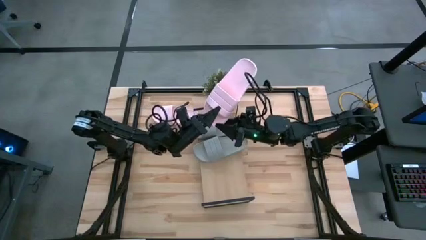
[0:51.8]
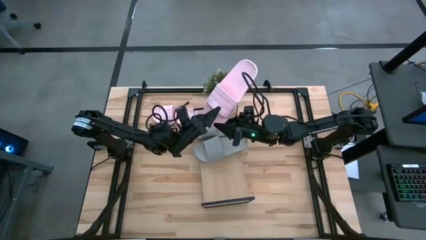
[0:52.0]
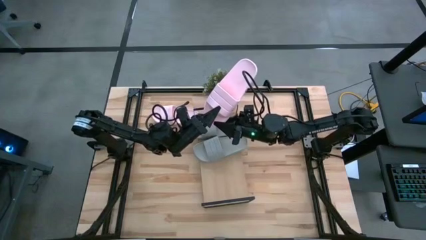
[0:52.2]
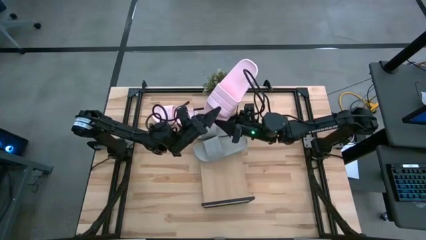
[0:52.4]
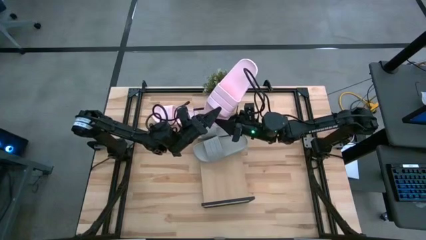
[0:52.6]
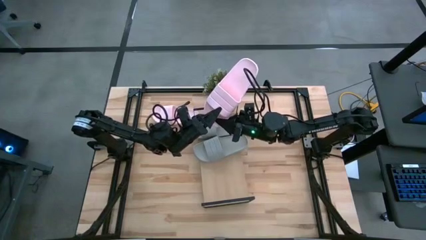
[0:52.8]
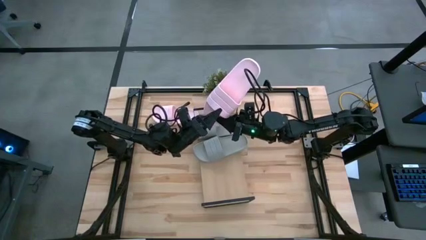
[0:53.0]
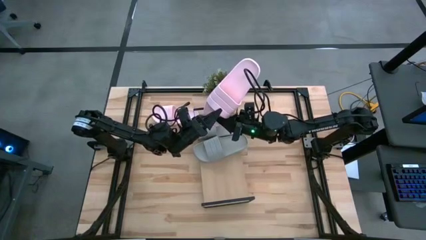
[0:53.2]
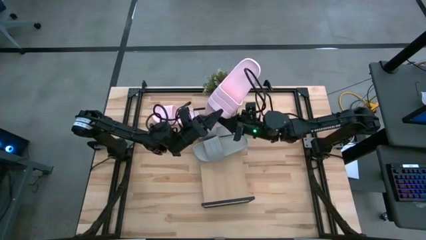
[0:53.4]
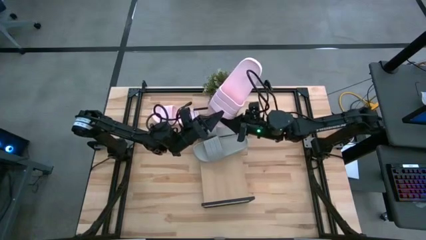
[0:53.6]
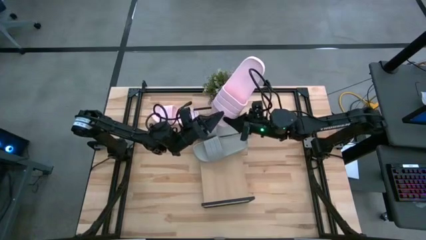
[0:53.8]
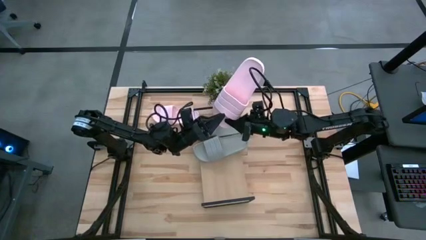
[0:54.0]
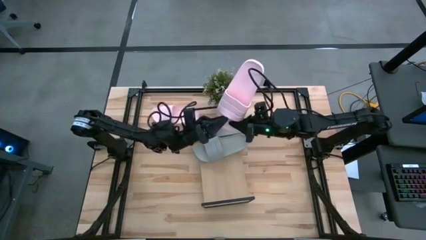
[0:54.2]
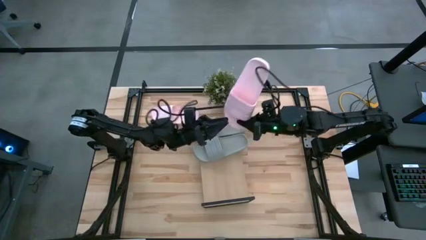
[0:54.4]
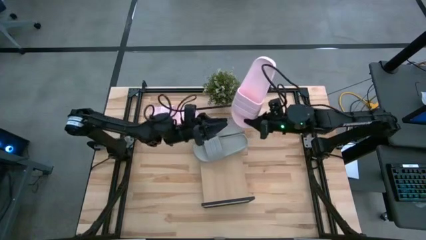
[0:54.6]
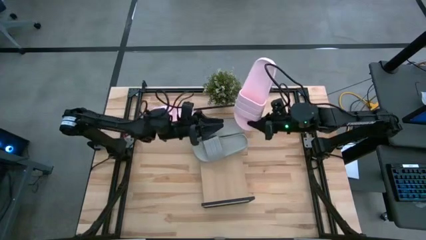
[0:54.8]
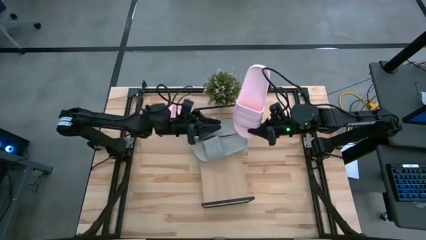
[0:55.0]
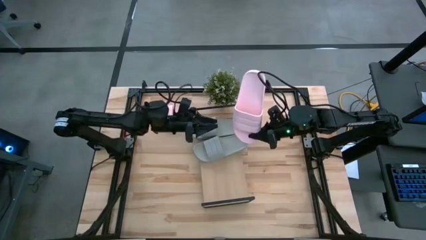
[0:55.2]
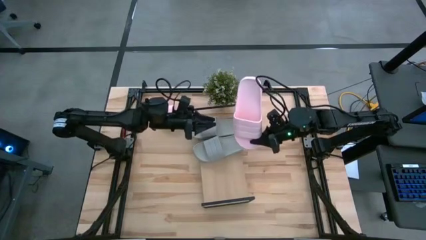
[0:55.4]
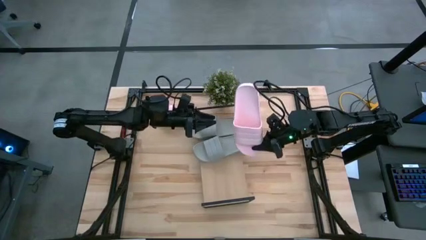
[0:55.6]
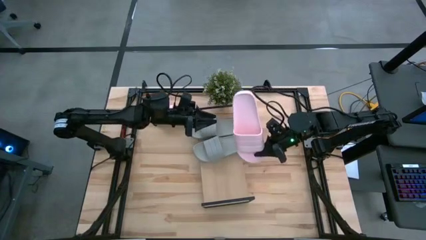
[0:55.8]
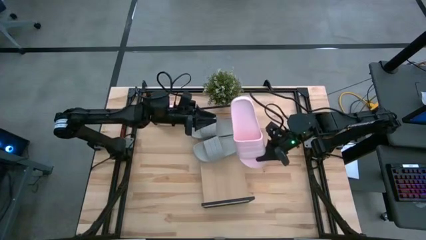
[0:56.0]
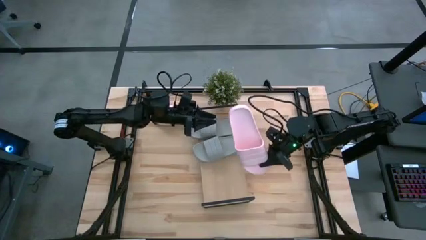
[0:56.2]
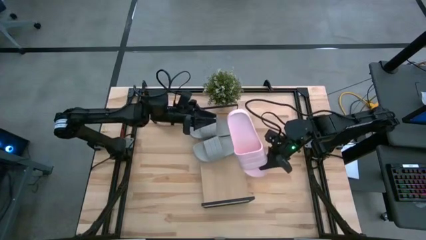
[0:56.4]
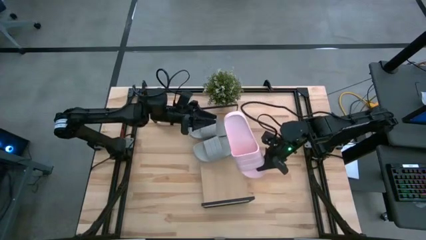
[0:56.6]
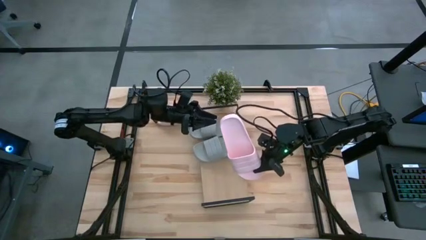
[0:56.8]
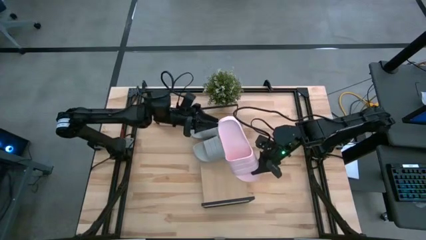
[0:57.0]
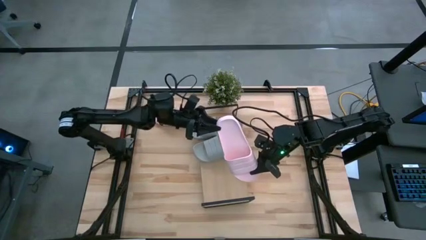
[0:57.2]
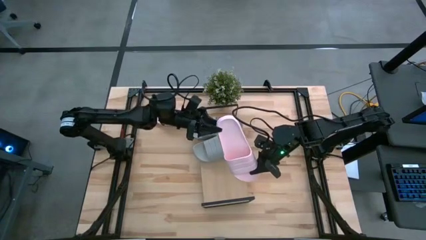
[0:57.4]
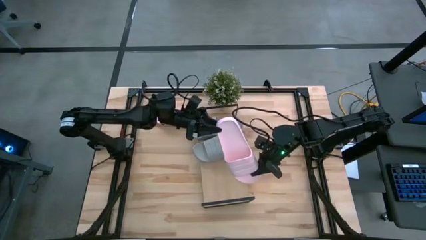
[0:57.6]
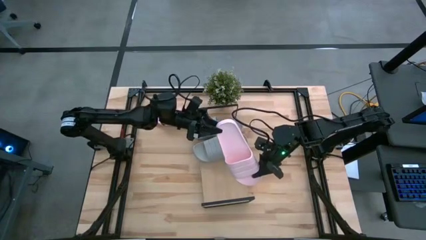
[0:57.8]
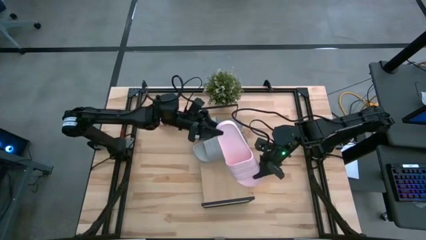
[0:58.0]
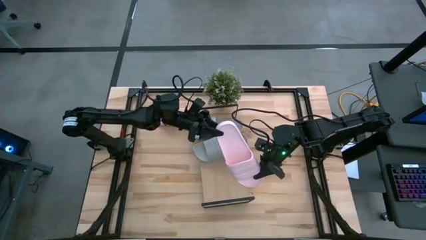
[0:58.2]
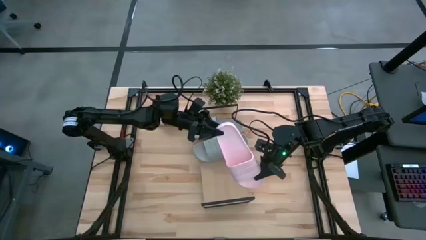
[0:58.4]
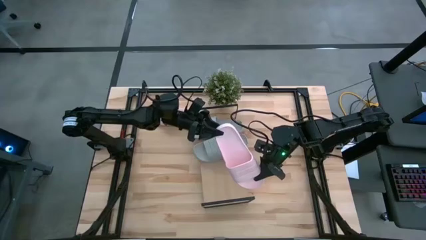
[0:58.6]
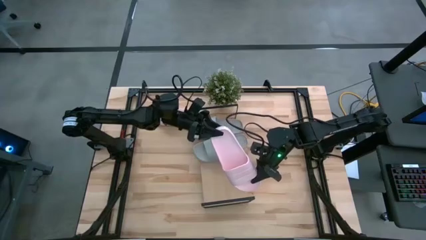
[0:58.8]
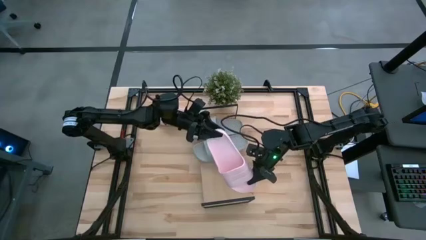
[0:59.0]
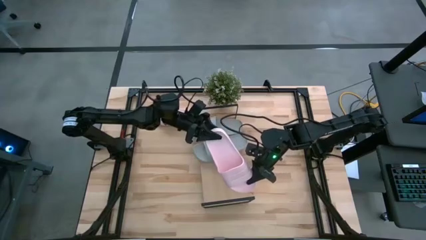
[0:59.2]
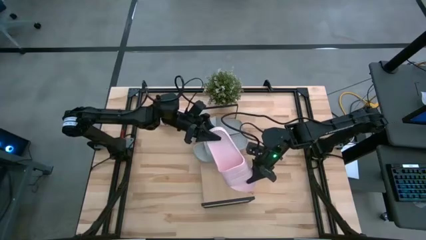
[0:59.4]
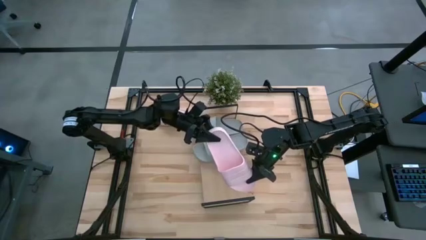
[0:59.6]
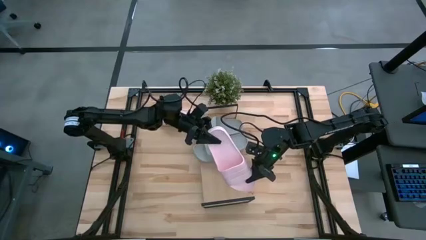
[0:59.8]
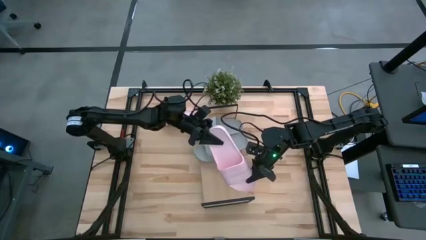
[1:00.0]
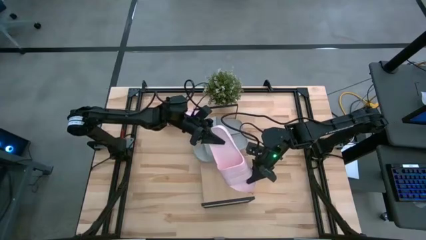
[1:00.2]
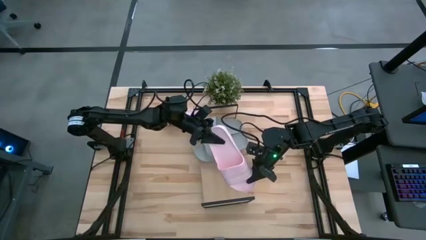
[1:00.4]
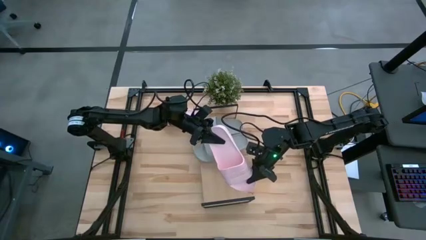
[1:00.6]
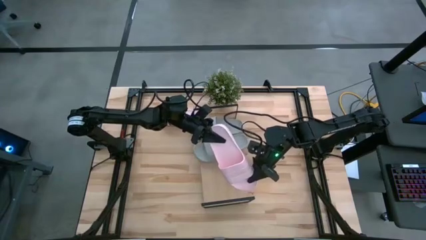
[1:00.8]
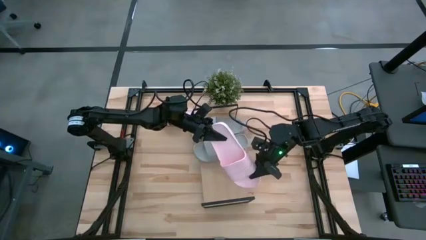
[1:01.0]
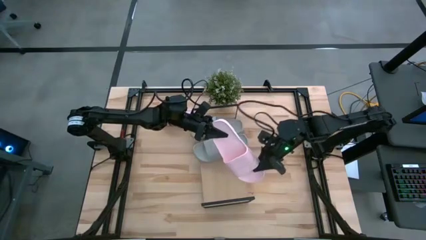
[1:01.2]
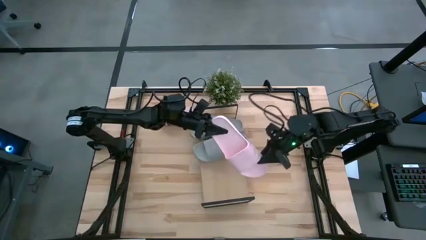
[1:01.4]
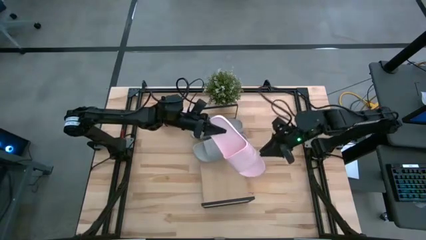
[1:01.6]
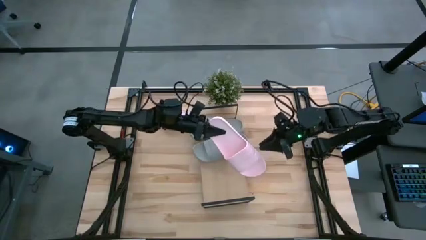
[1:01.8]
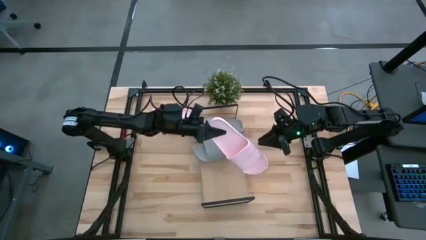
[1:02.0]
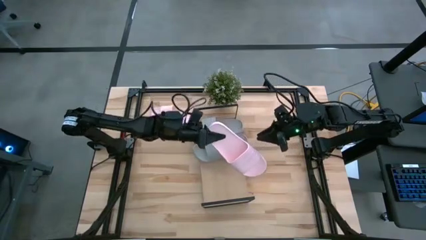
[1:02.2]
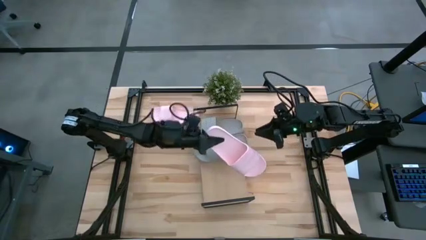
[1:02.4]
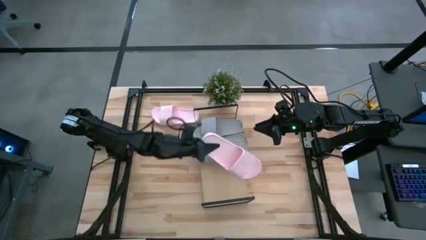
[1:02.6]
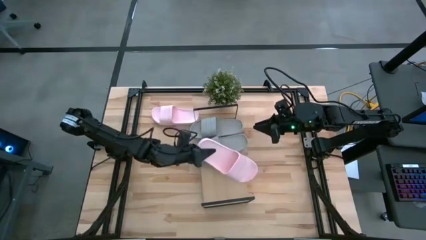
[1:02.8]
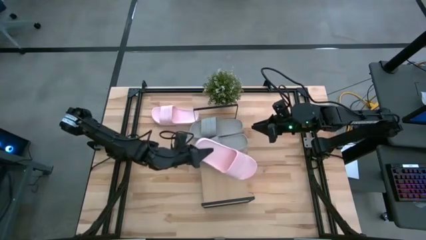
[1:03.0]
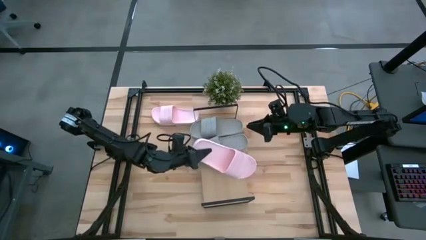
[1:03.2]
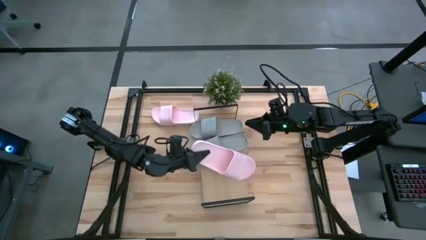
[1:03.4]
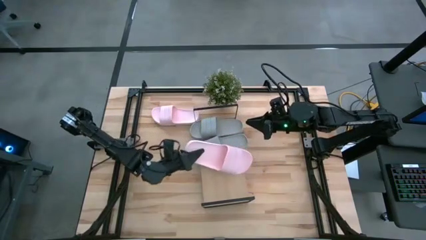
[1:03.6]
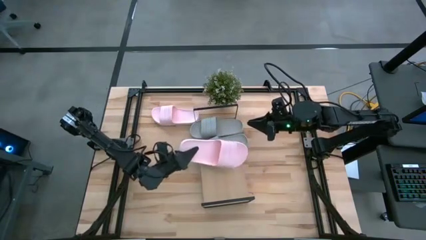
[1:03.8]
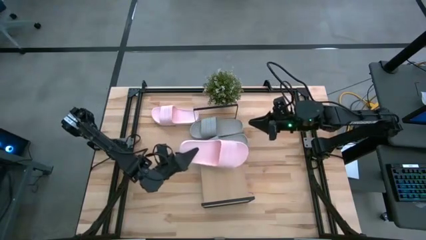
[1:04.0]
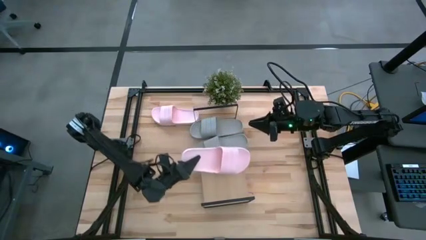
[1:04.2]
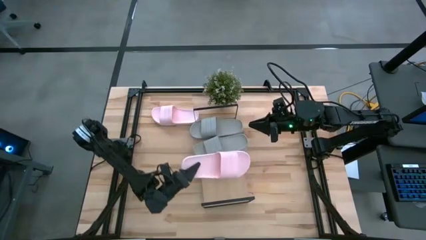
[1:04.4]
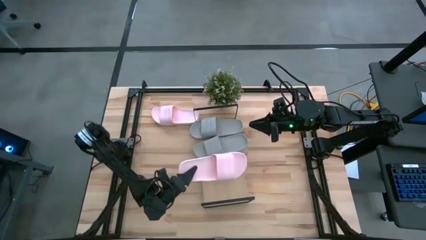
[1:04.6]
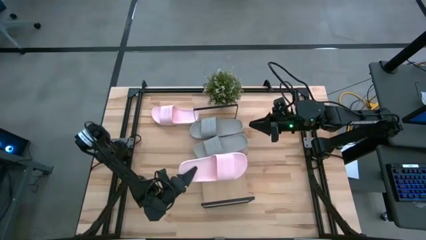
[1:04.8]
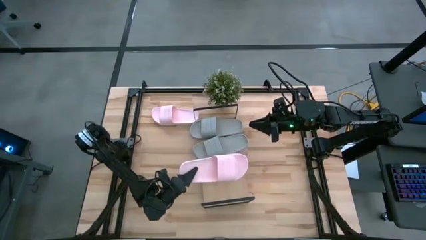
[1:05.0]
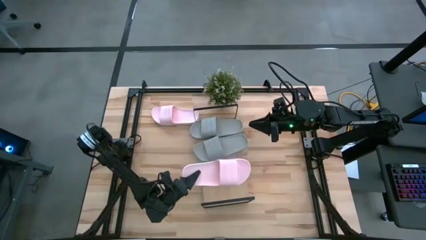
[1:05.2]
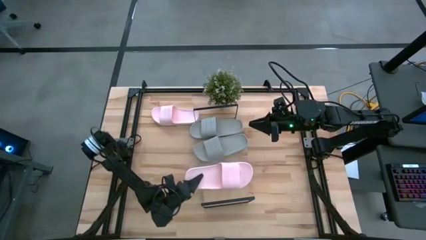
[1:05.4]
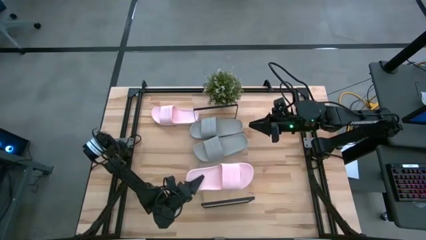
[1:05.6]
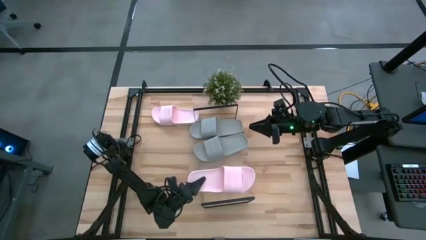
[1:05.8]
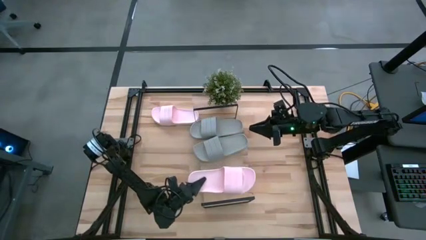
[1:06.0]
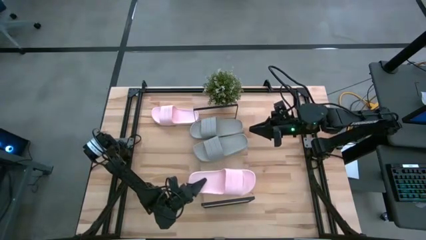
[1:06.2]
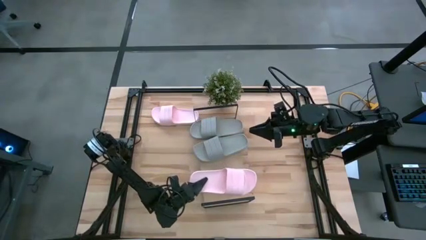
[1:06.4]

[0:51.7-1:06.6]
Task: Pick and place slides into the shelf
Put the bottom pink slide on the shelf

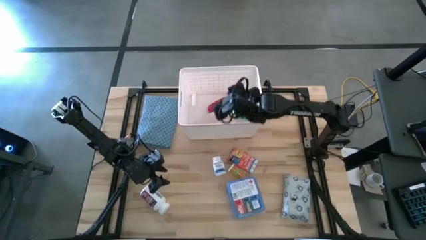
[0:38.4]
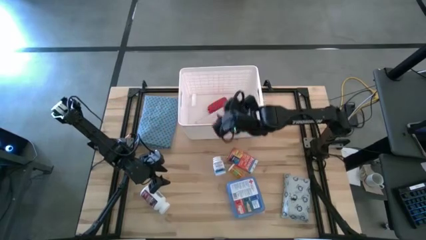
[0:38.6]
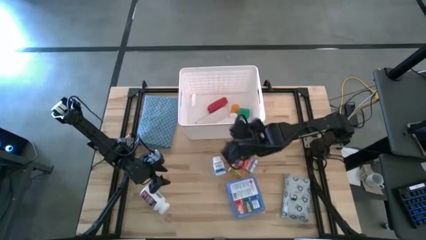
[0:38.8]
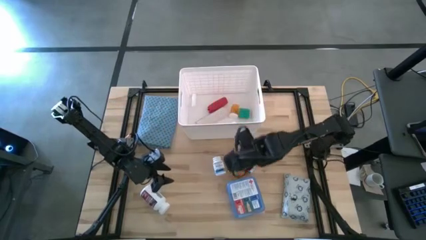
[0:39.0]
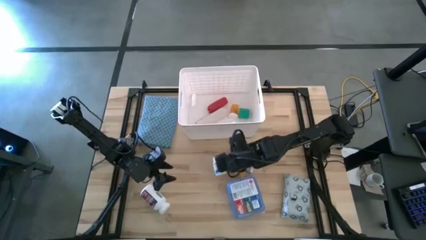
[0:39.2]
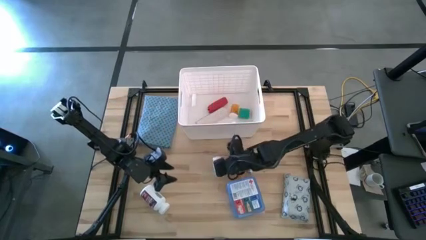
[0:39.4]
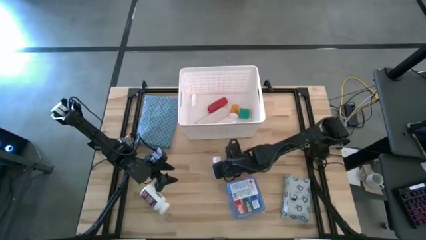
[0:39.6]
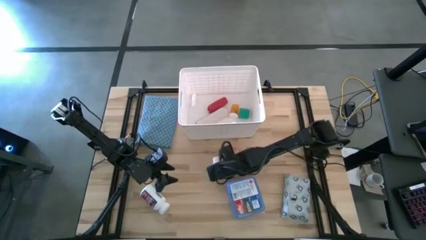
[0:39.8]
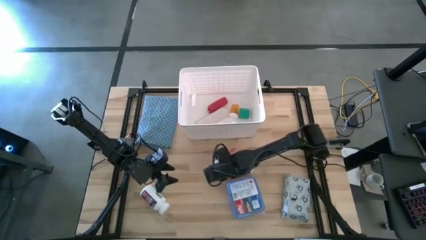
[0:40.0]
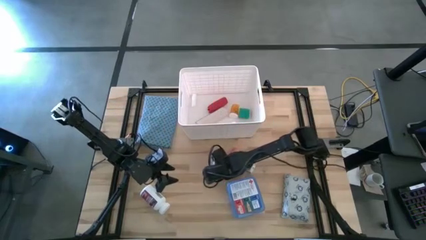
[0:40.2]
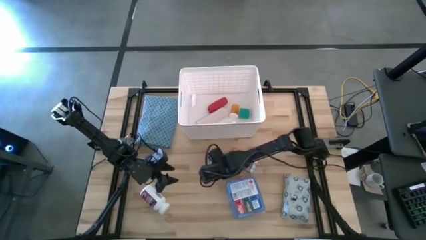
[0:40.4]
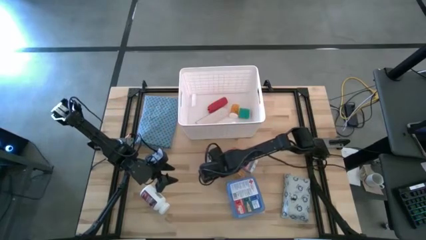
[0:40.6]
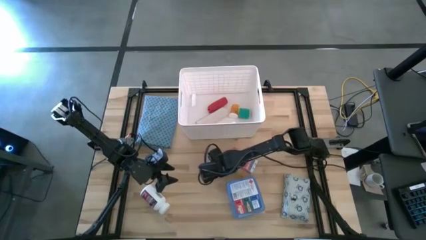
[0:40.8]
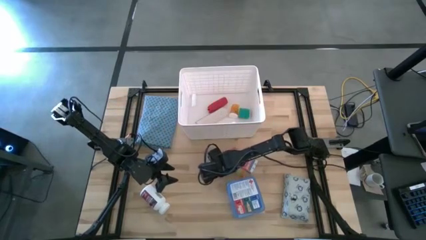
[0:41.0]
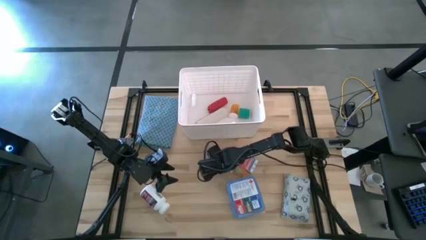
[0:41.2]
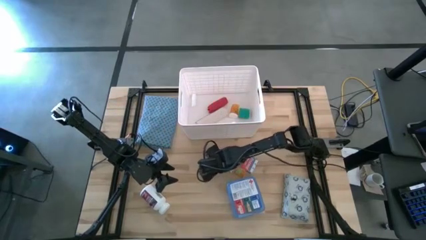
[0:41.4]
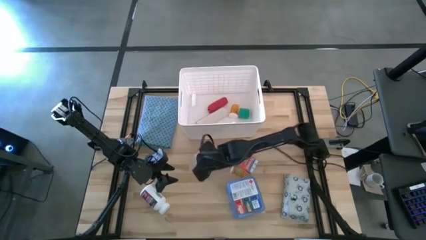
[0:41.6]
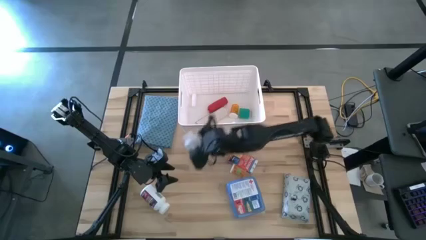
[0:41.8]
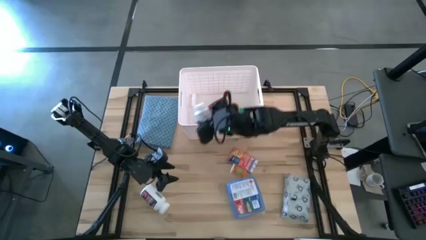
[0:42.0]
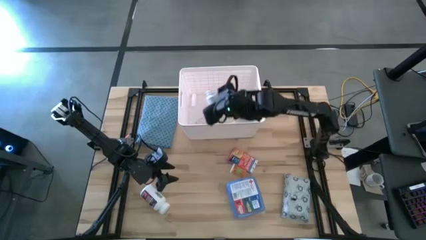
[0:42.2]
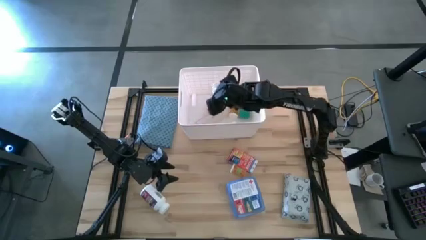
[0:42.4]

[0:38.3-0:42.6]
Task: Pick & place medical supplies in basket/bin
Put the white and blue medicine bottle into the white bin
